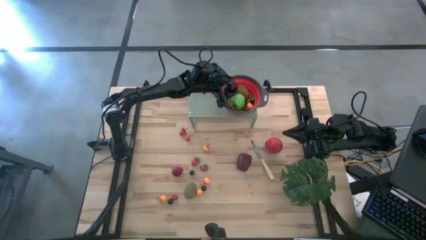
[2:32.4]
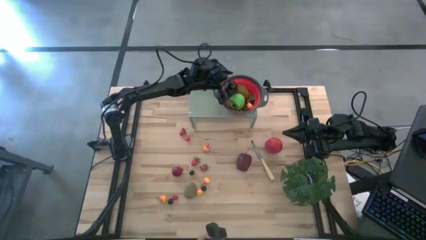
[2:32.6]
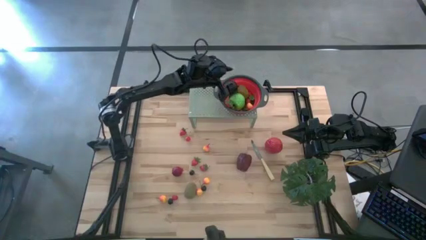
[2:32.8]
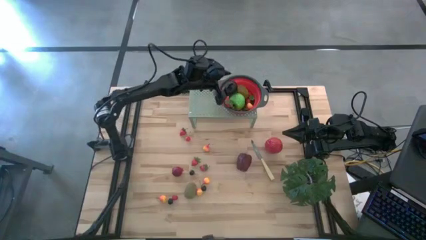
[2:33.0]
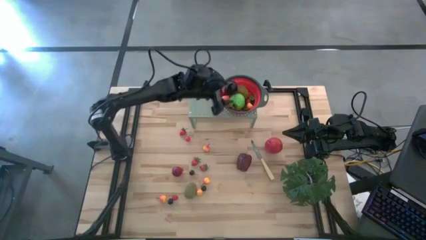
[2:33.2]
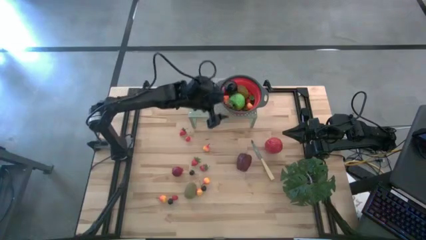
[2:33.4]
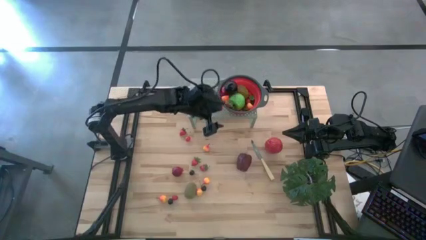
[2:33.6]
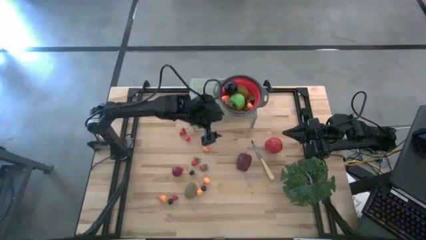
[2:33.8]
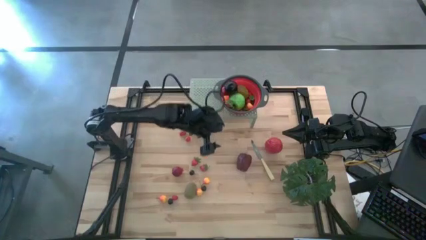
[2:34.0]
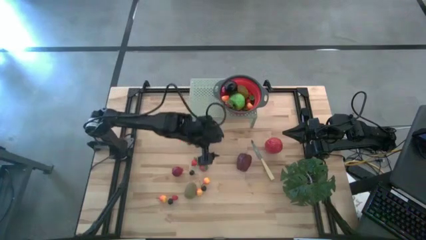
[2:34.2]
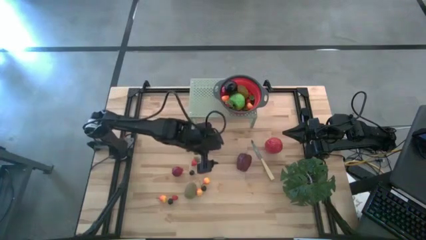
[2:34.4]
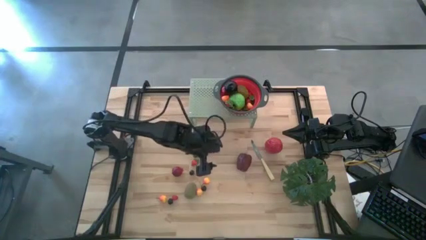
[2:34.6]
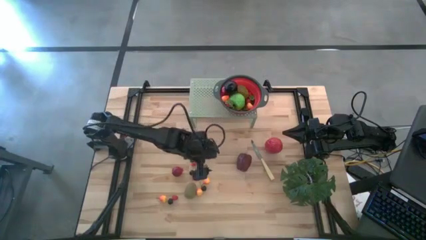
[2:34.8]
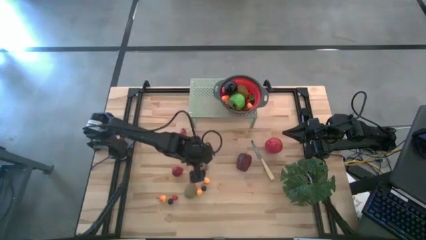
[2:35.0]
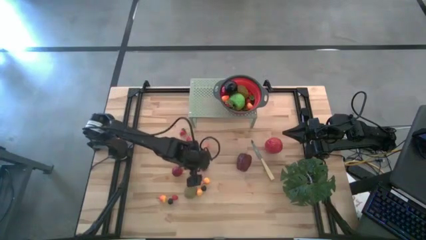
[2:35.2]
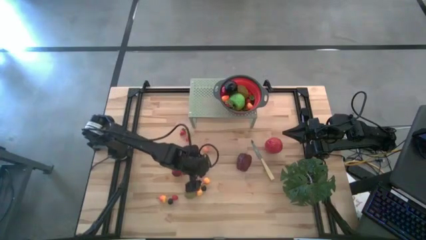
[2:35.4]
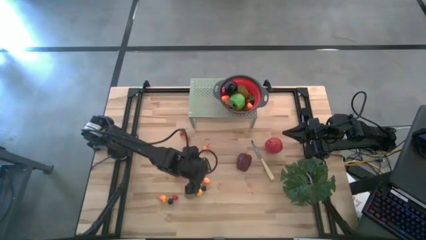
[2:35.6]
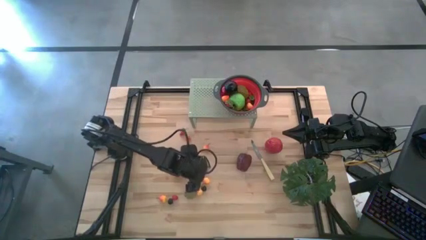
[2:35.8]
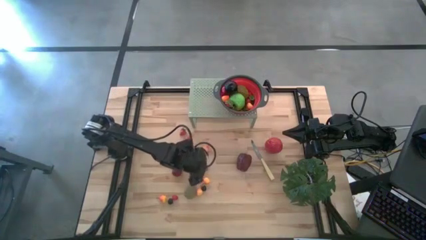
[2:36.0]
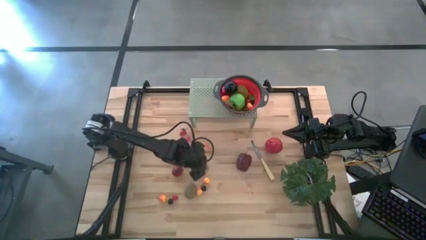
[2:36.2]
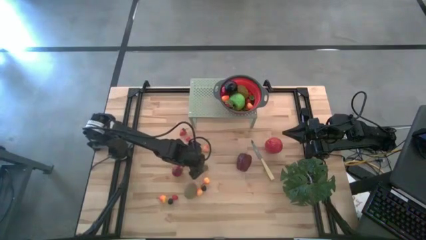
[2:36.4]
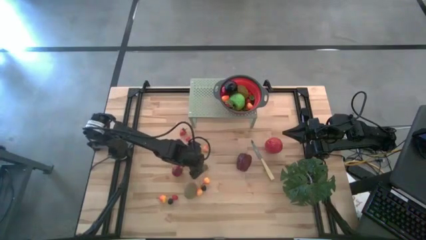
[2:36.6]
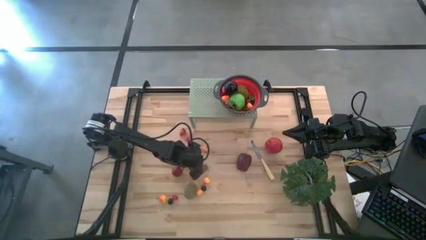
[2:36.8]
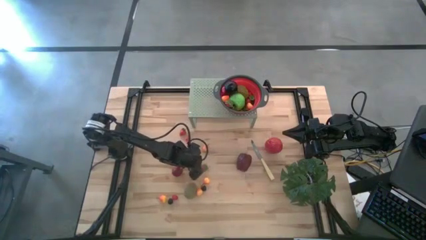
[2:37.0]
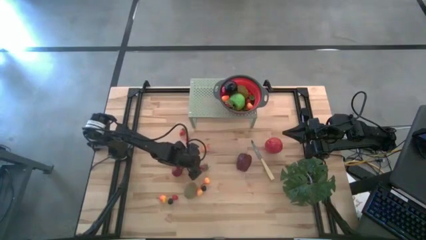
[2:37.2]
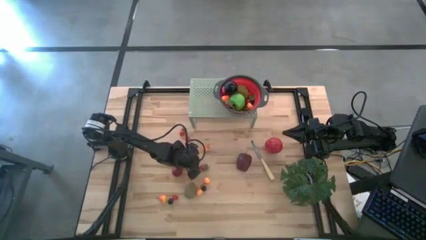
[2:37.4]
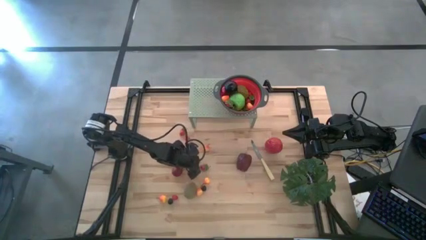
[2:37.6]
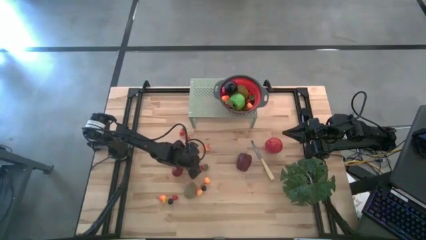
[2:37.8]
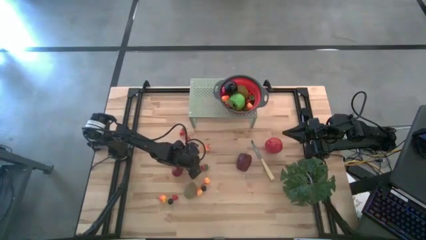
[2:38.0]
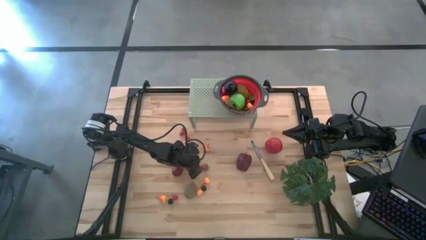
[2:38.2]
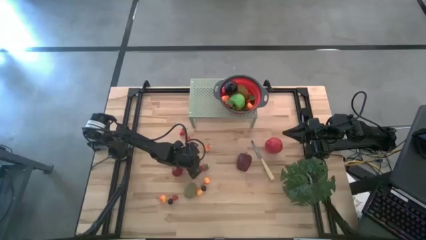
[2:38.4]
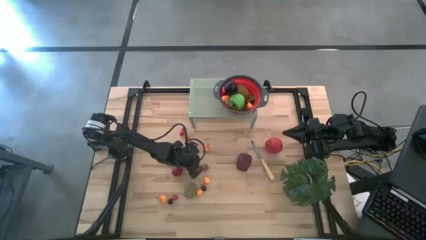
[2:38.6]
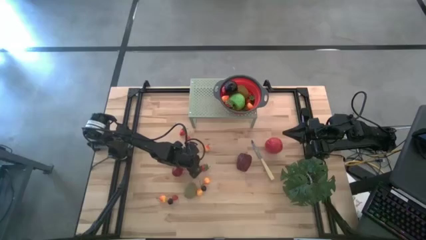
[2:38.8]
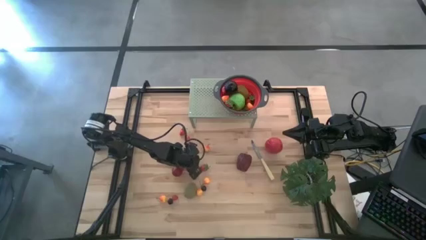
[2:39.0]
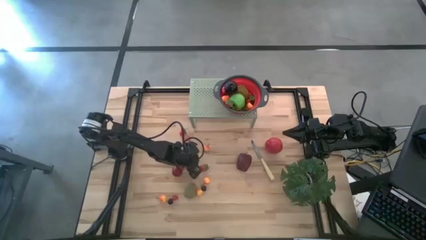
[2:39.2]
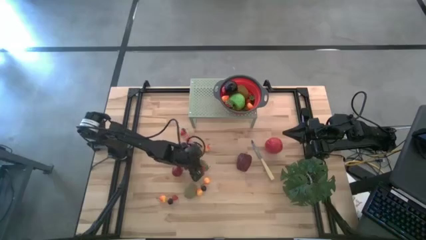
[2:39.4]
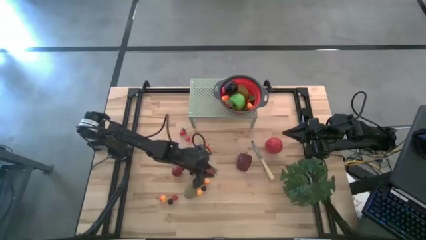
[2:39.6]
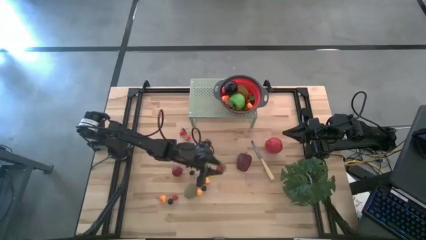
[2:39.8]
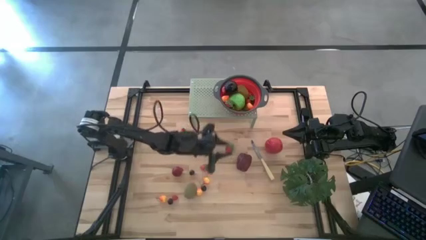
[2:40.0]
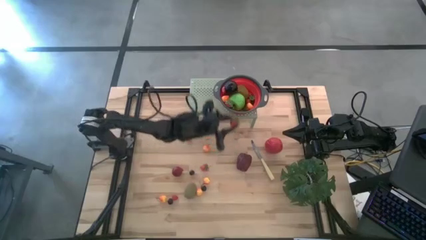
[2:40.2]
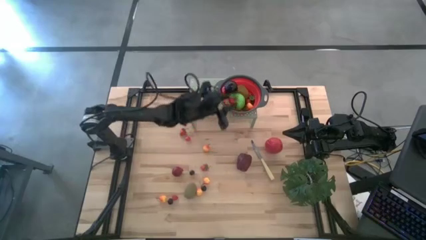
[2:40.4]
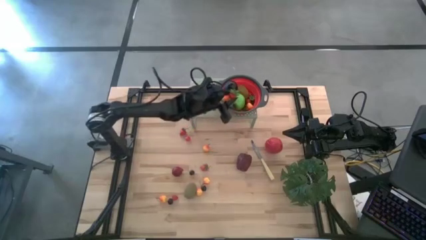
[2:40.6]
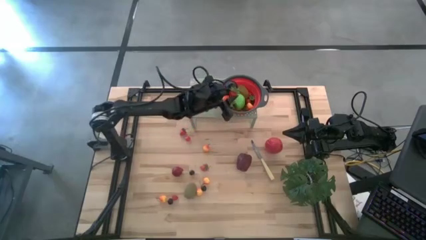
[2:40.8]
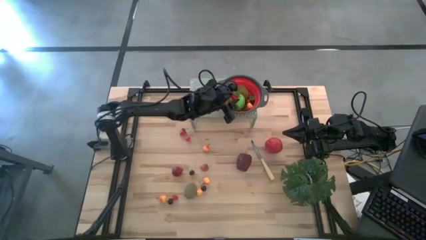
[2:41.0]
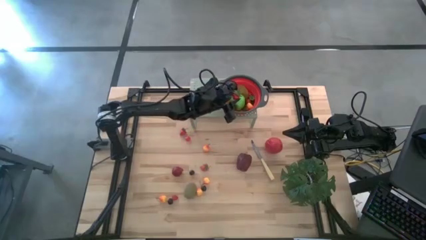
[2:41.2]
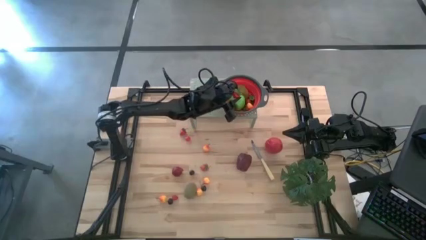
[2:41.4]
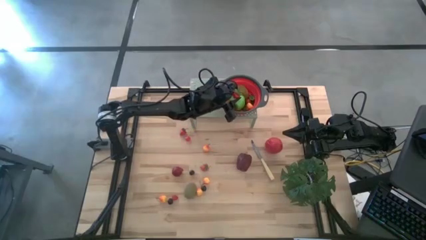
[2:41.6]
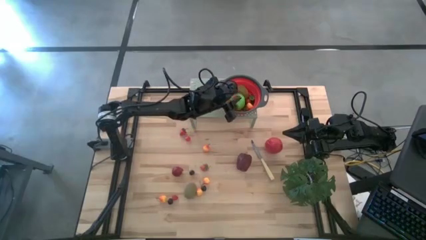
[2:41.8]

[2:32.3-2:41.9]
Task: Pick & Place Fruit
Put the red strawberry into the black strainer bowl on the shelf

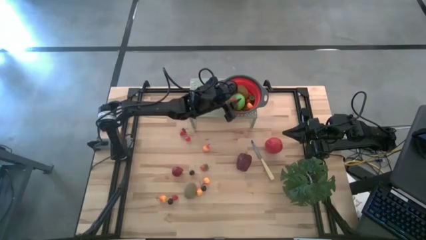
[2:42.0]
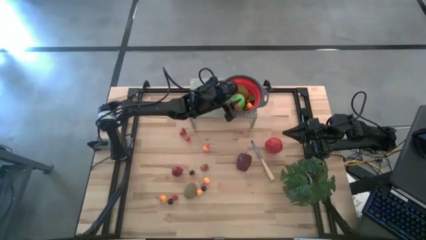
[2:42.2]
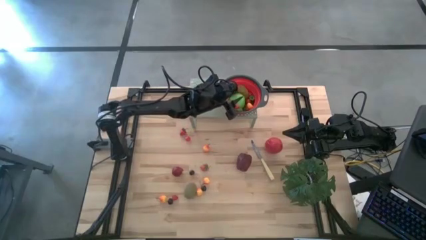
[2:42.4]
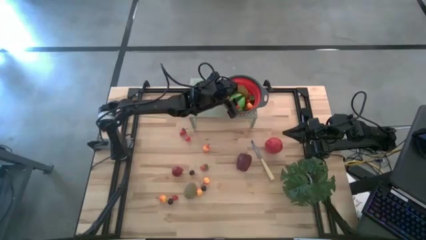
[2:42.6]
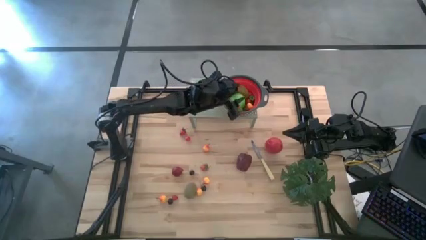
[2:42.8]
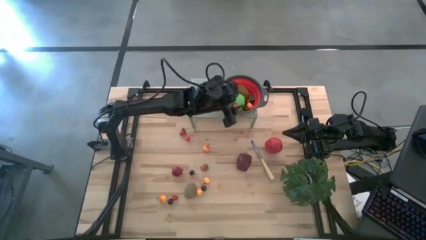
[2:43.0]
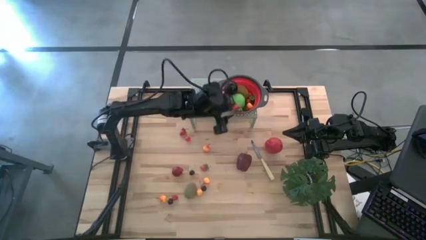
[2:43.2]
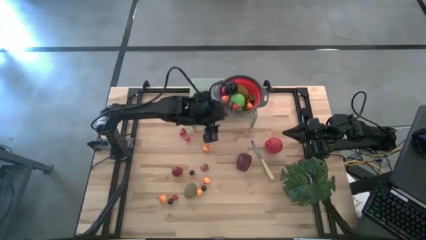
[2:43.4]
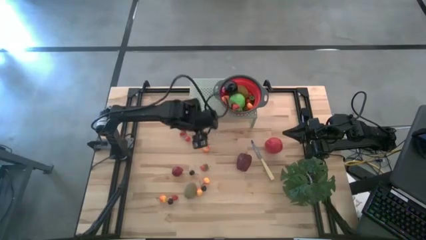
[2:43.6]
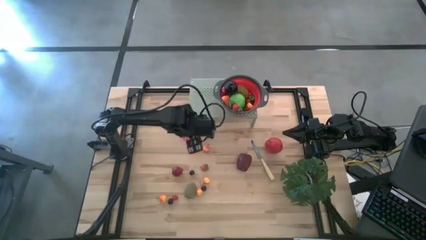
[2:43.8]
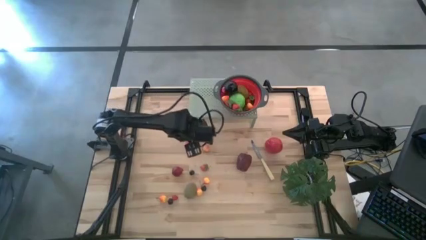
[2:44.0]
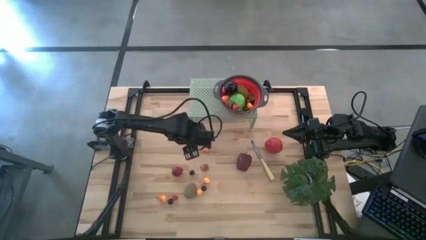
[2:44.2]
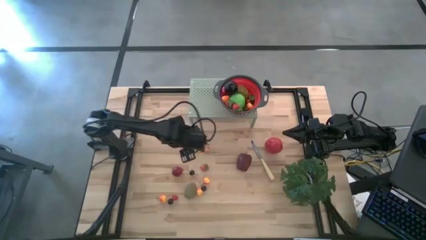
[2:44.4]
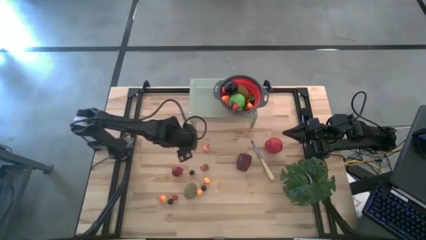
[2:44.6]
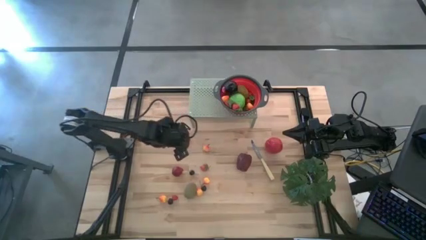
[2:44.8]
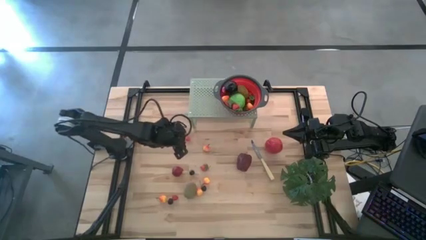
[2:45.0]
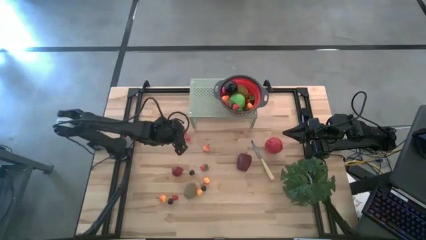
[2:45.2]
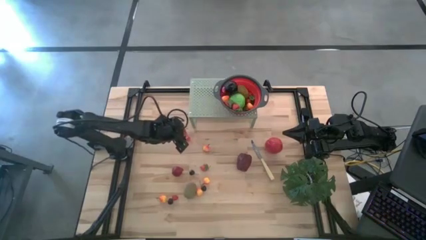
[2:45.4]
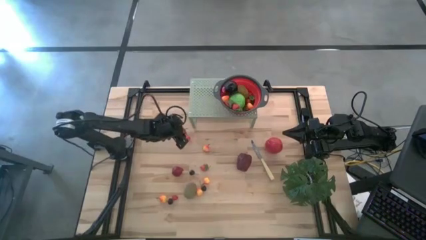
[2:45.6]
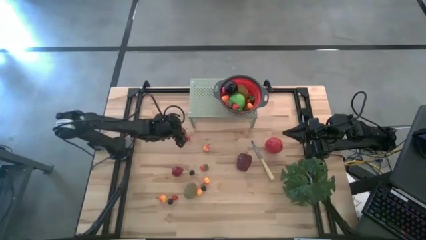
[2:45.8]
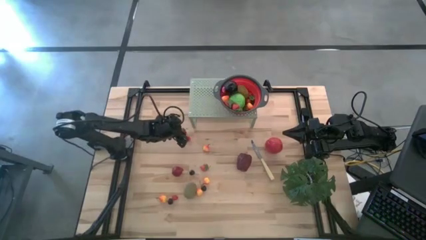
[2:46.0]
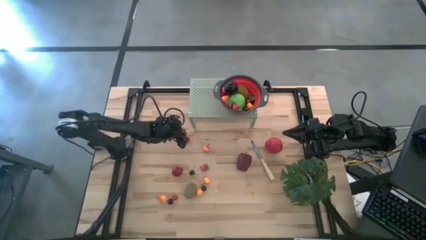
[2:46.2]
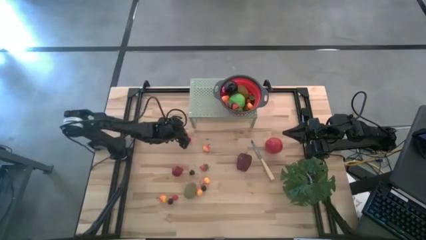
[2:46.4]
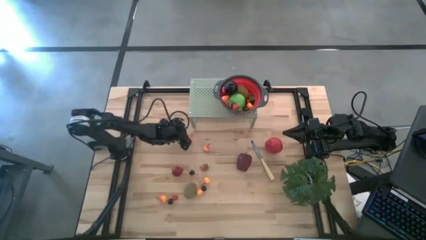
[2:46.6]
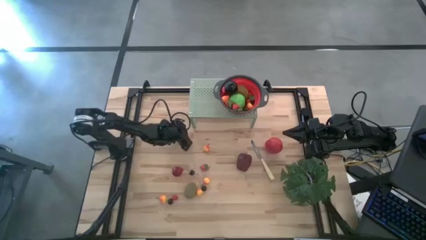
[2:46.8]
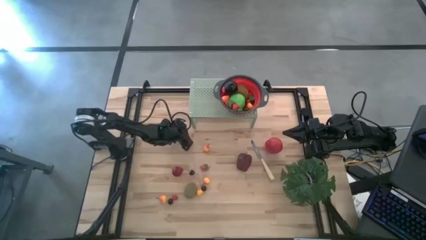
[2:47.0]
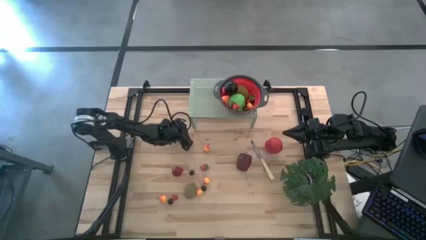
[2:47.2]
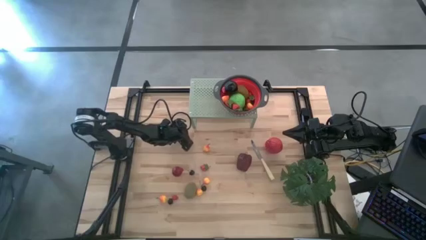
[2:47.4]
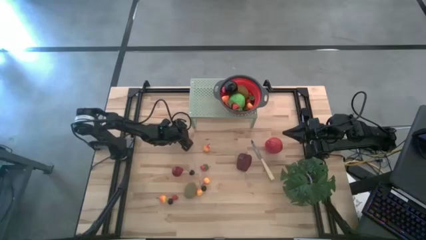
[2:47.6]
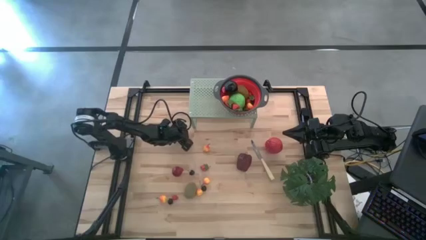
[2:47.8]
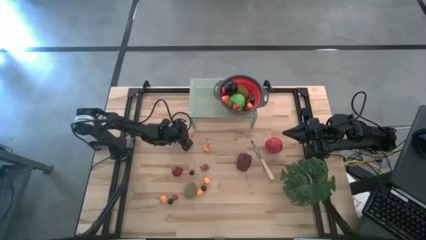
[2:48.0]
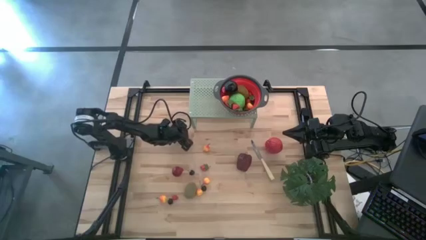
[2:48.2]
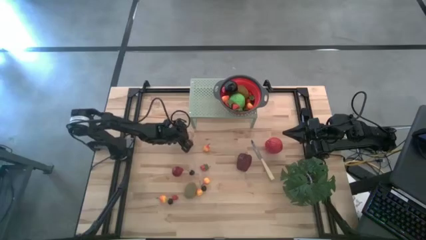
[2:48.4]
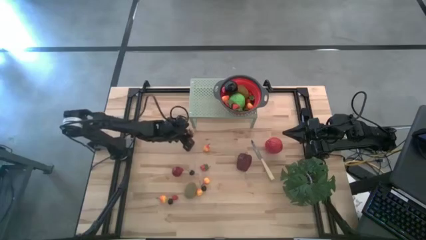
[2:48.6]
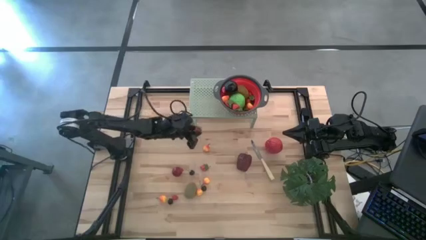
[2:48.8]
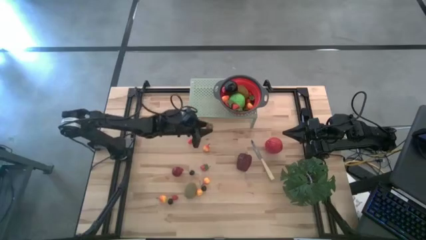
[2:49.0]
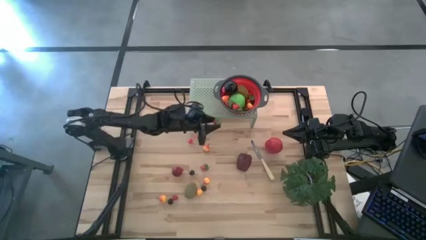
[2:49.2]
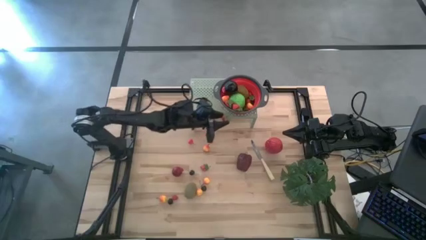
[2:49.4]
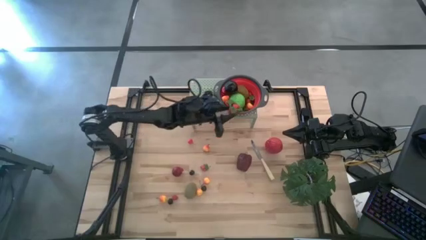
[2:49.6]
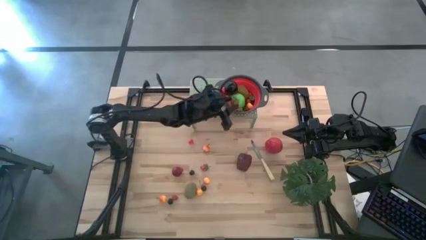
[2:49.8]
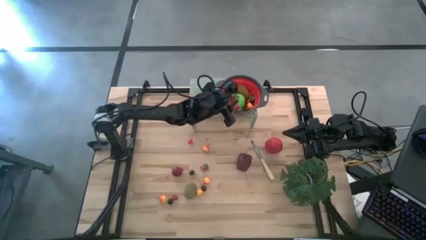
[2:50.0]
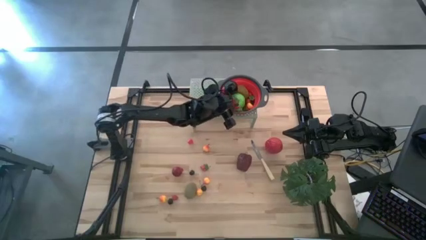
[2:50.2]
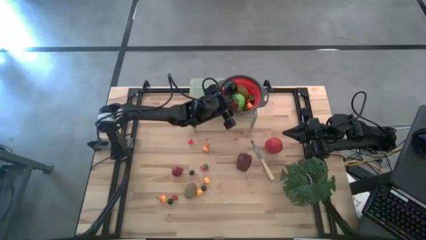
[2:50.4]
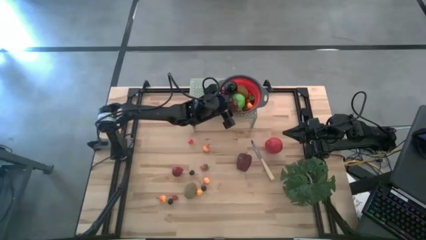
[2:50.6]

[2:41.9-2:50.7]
Put the red strawberry into the black strainer bowl on the shelf
